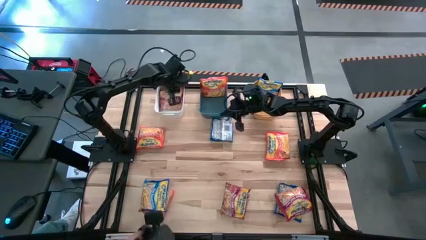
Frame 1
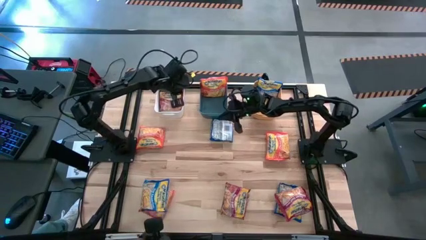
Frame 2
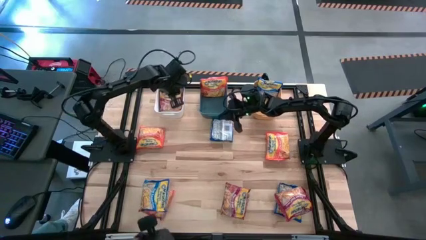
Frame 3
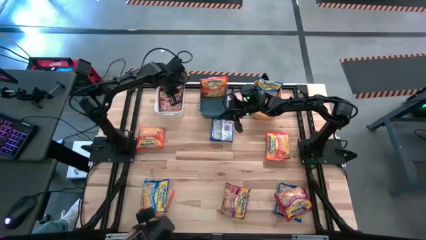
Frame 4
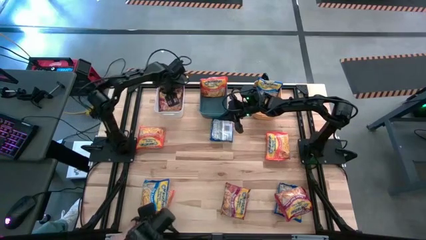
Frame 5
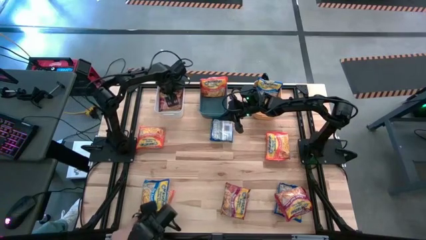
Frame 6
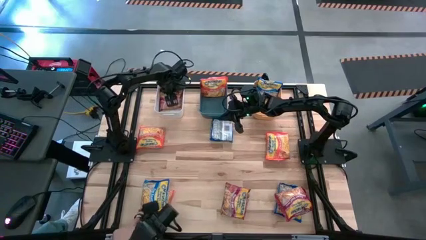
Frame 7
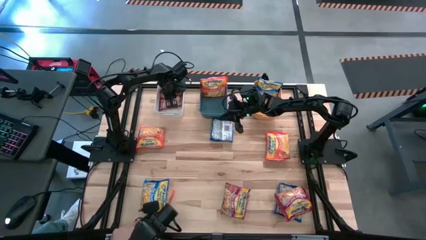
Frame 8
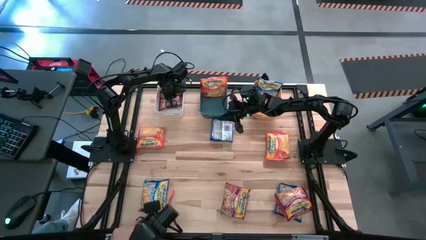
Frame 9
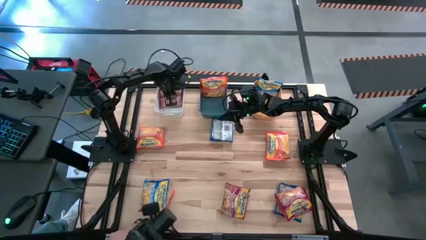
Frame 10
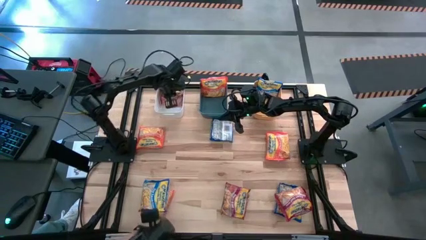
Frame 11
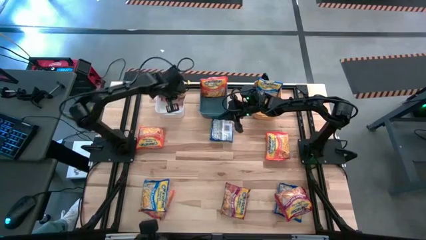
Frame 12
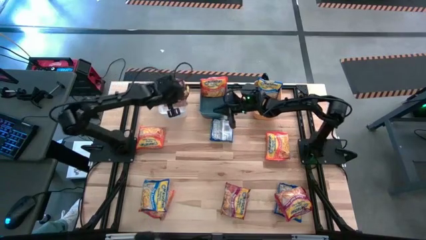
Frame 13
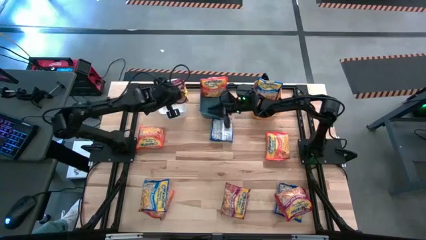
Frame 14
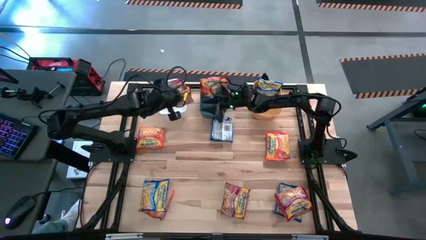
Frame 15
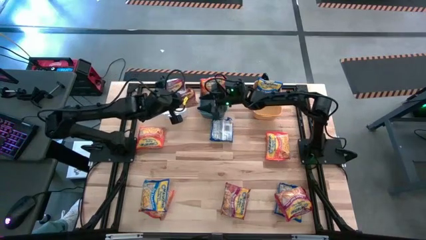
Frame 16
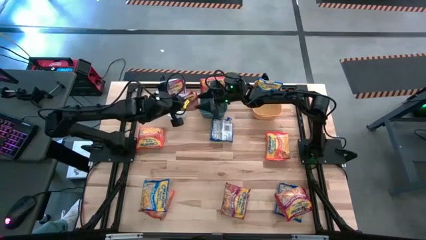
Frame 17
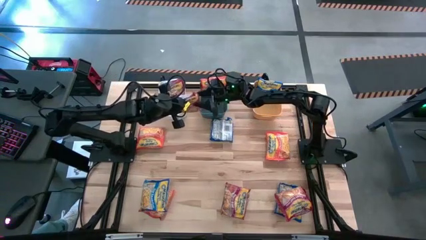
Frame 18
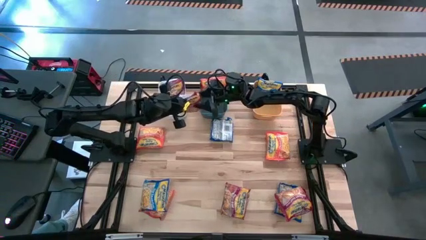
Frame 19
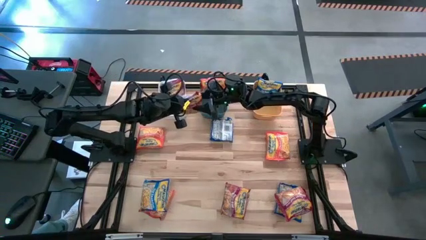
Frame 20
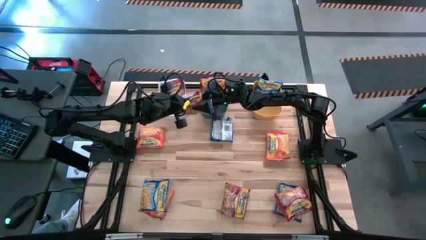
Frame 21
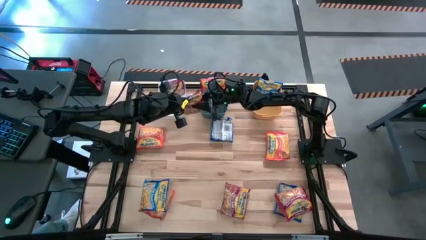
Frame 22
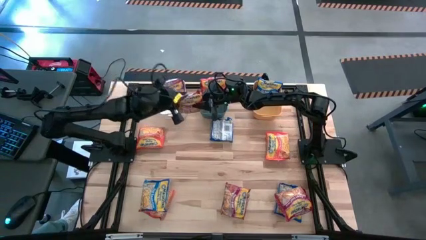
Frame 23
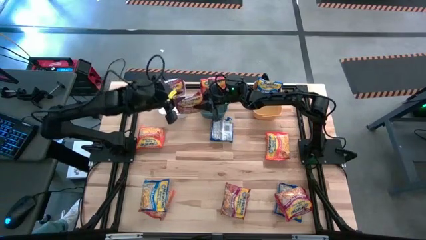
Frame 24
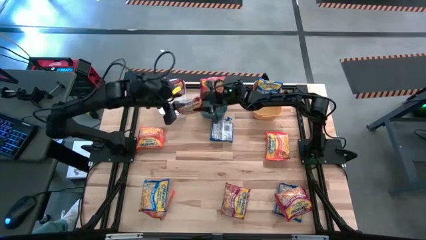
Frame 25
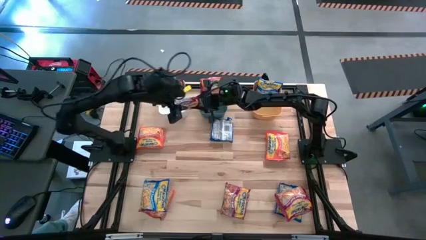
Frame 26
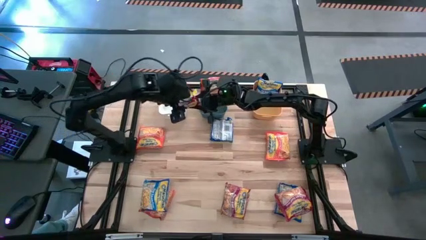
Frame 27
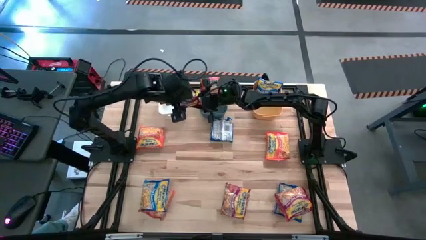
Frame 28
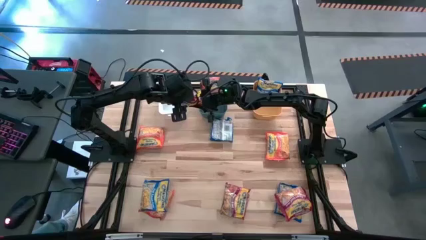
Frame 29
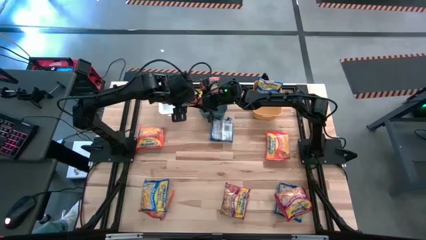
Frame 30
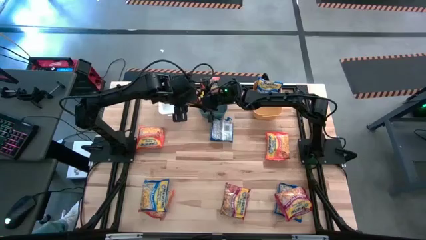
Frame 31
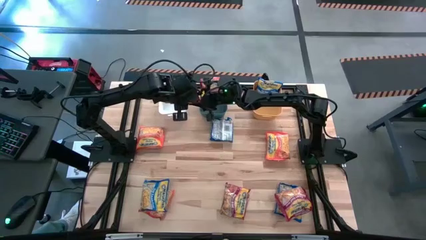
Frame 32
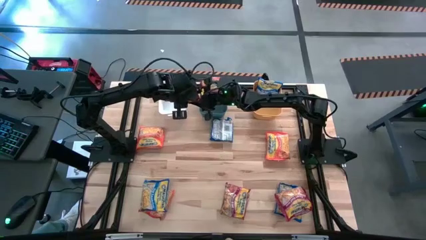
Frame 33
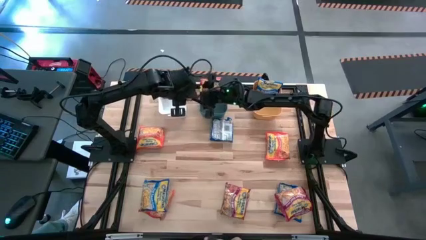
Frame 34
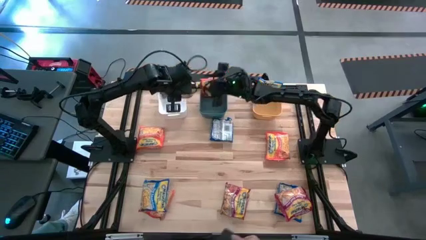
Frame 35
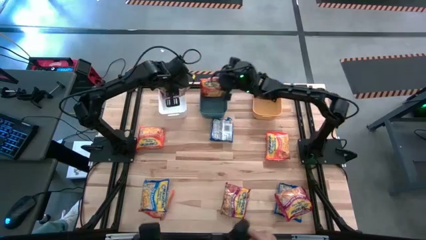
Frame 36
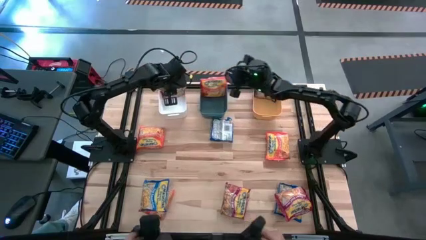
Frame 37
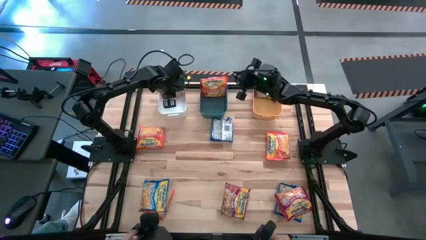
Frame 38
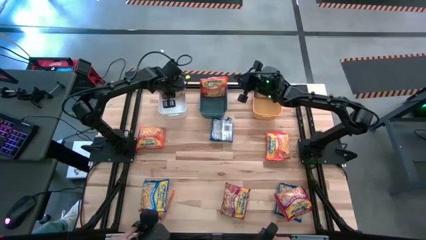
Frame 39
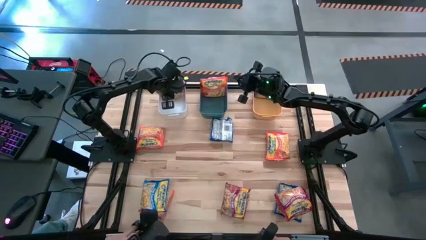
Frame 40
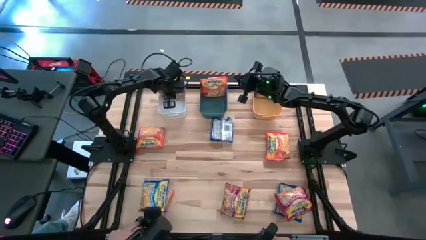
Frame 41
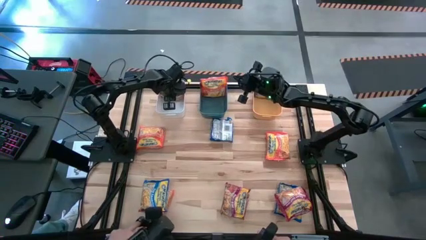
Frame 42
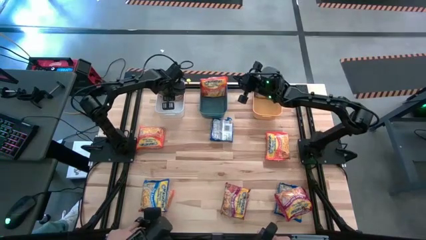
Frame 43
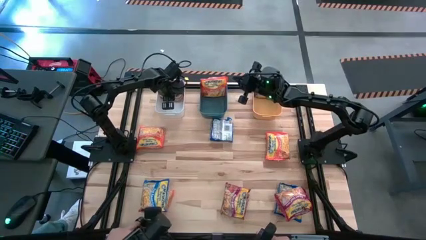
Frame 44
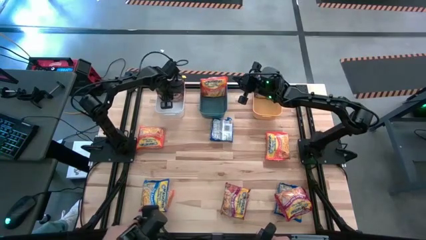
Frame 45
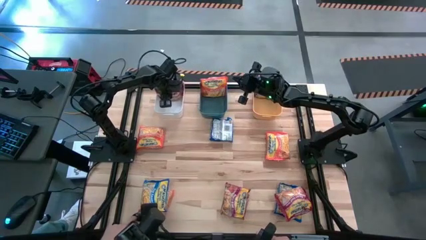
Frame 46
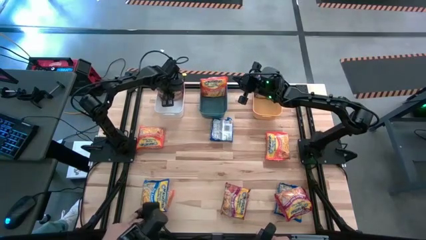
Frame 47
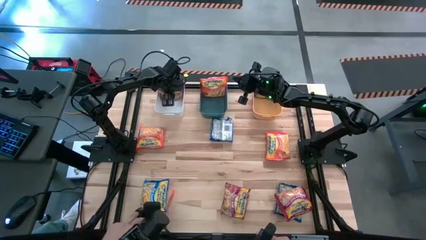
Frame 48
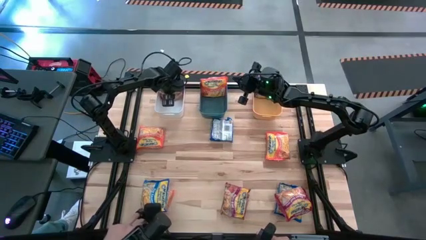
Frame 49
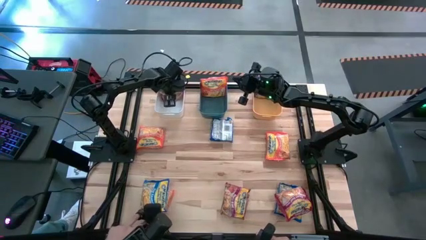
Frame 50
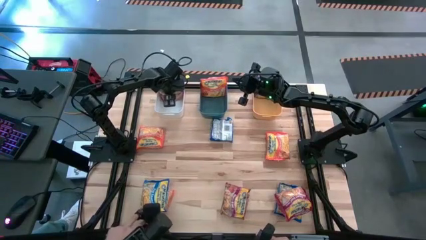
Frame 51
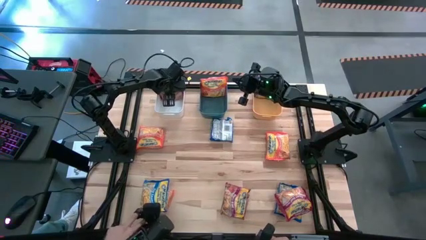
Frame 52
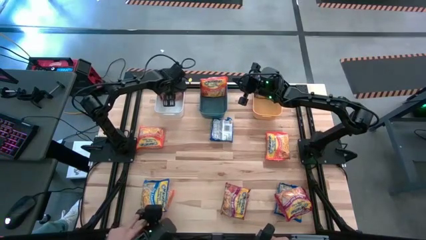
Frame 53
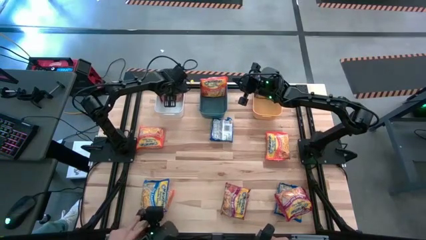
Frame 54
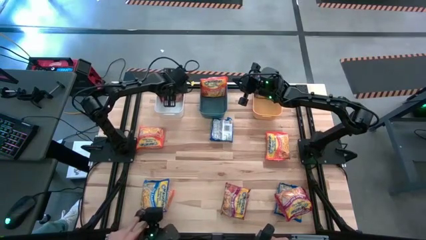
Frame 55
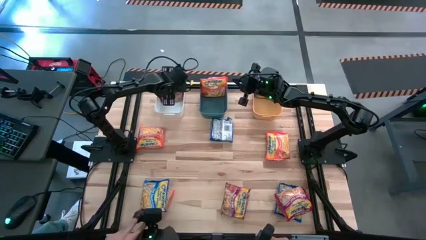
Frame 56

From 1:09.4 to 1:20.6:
Task: Sort Maruchan noodles
Put the red noodle pack into the white bin

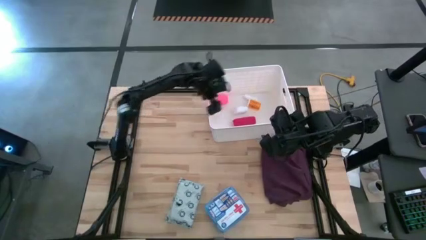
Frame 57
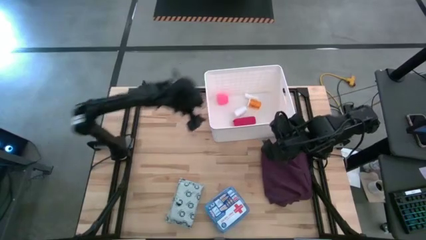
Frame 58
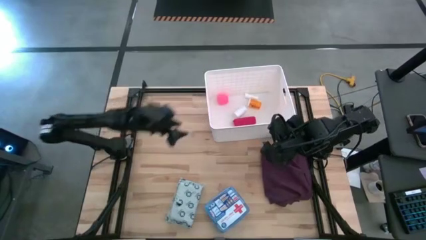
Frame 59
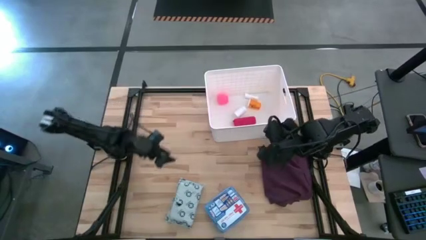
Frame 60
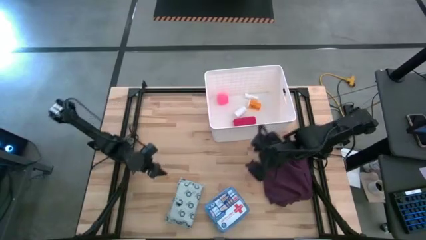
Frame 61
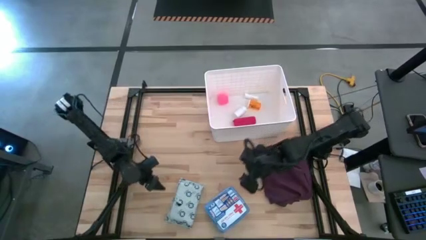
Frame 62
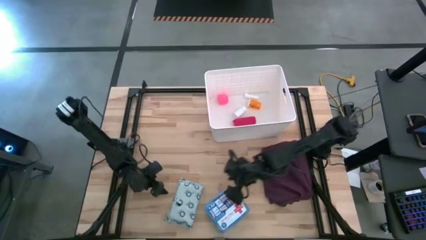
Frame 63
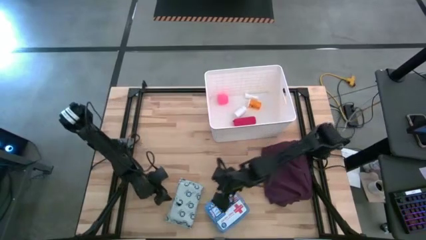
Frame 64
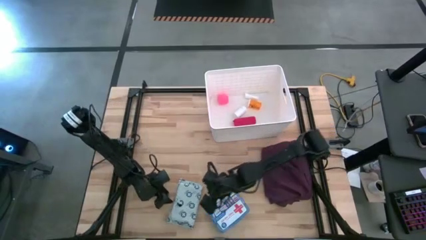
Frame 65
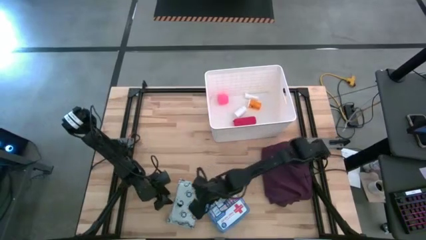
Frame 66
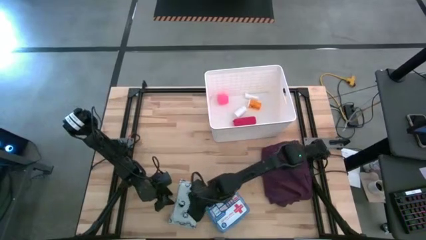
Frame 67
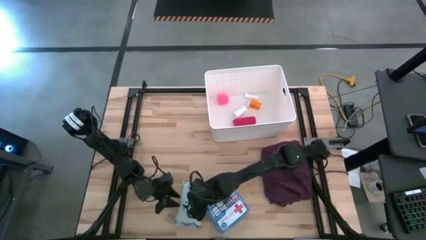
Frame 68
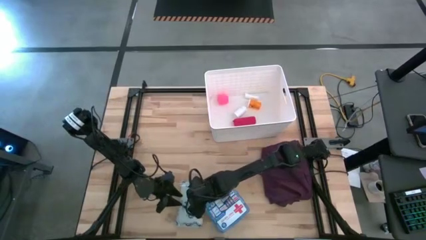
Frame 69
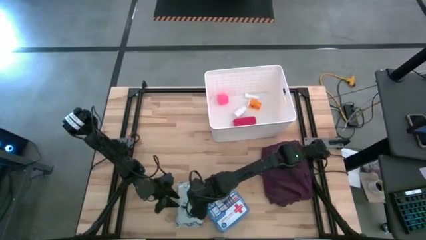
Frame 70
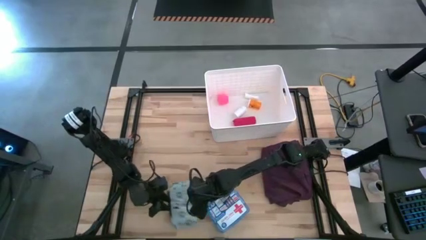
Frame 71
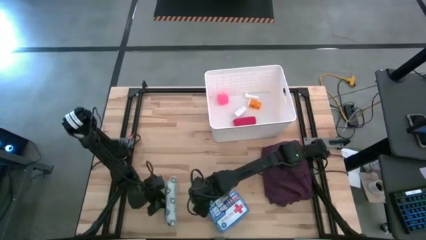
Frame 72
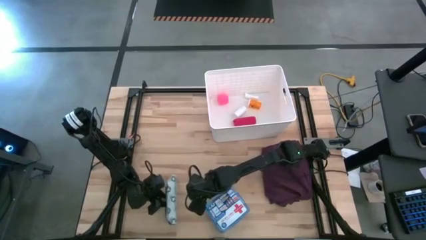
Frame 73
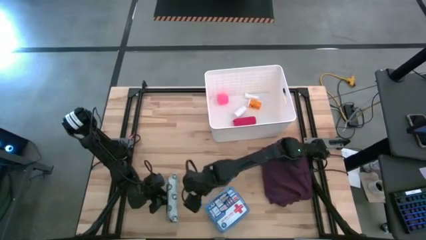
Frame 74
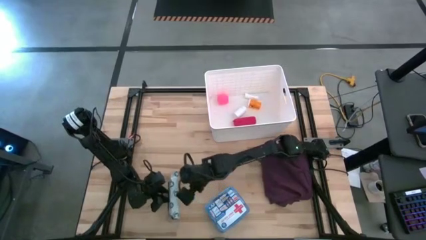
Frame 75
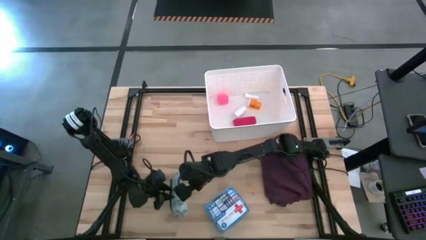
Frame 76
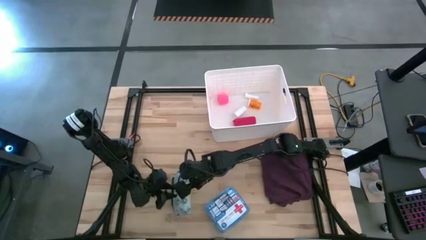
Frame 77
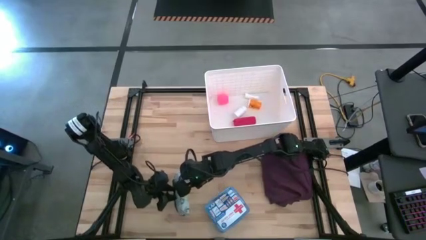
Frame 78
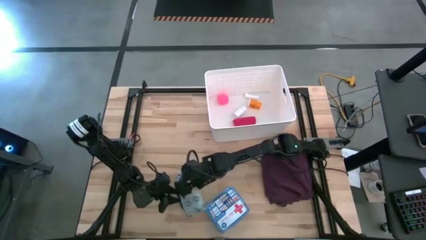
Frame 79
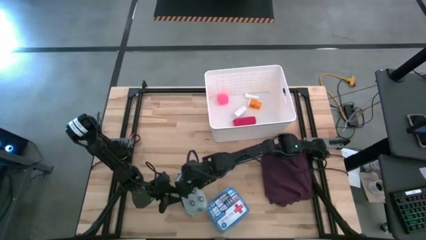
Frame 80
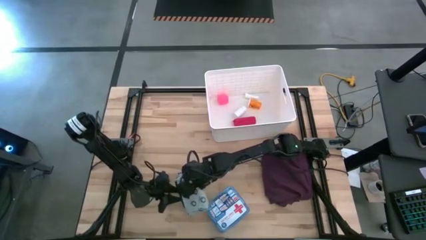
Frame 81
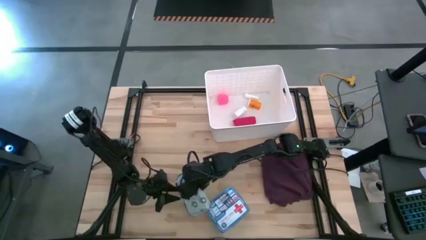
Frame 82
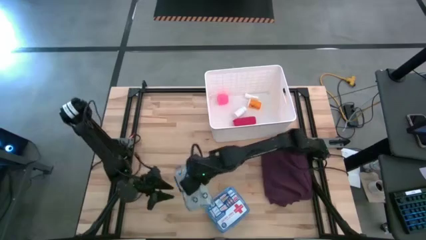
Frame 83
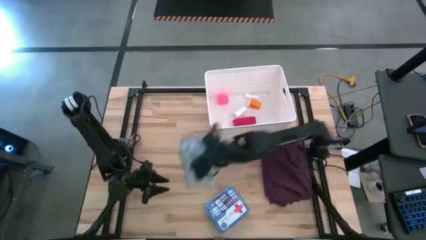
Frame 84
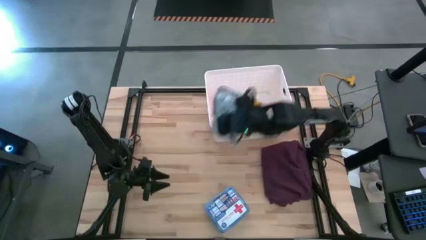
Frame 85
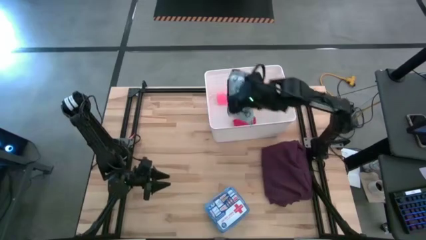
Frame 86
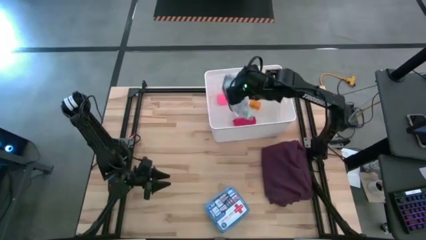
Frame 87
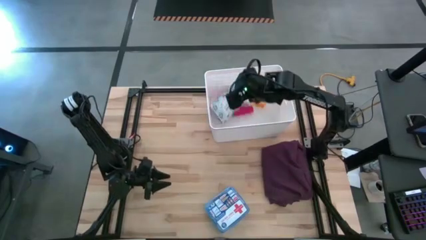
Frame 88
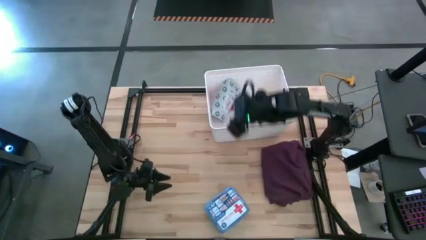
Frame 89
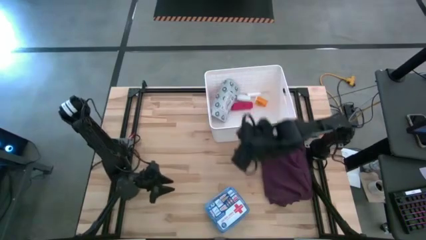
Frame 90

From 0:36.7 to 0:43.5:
Task: Pick & place medical supplies in basket/bin
Put the medical supply bag into the white bin
